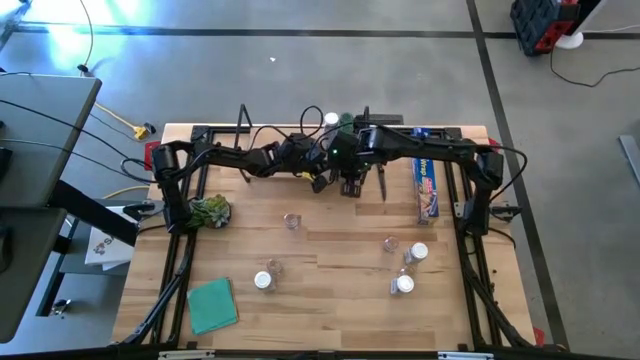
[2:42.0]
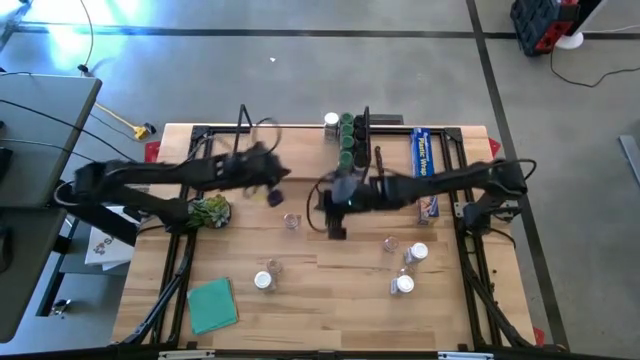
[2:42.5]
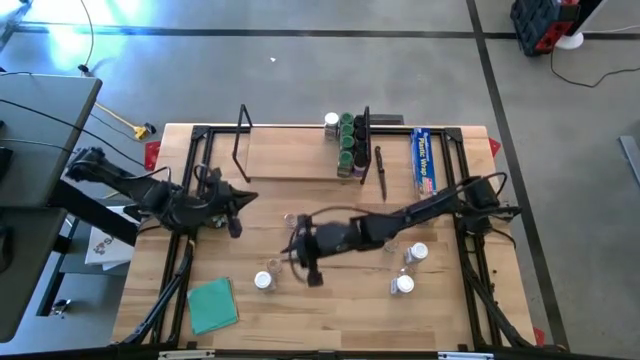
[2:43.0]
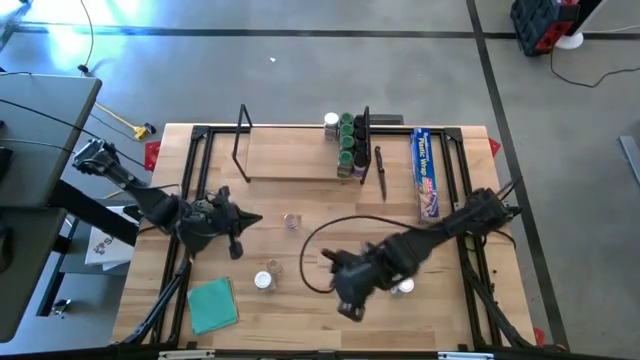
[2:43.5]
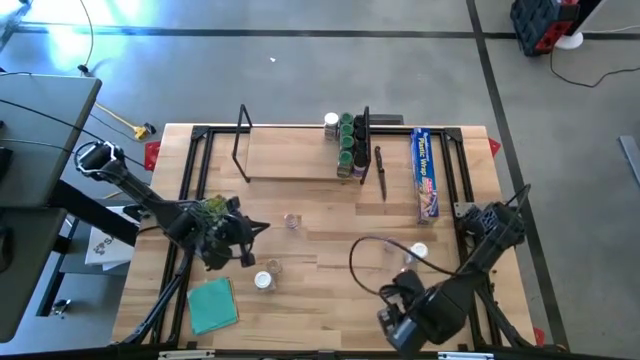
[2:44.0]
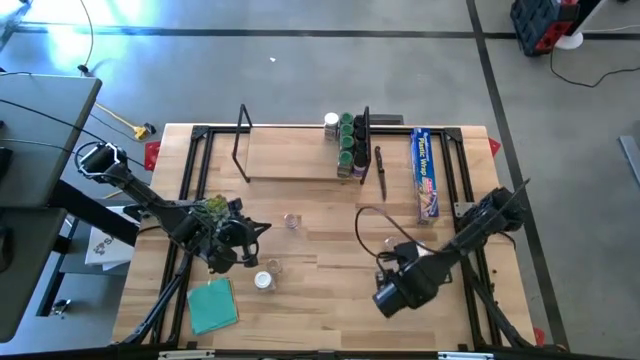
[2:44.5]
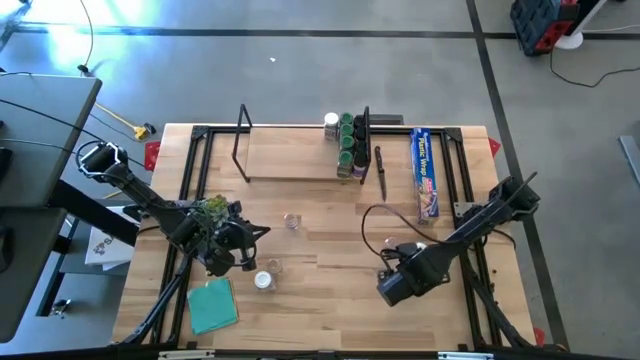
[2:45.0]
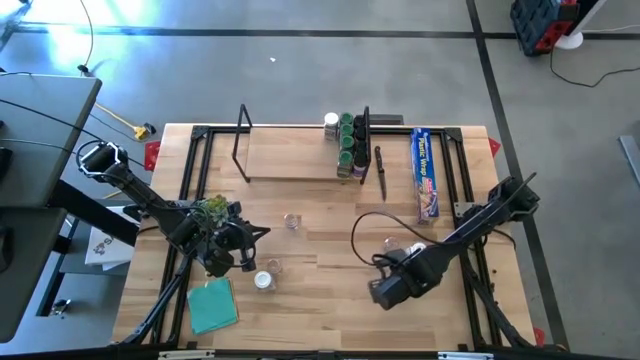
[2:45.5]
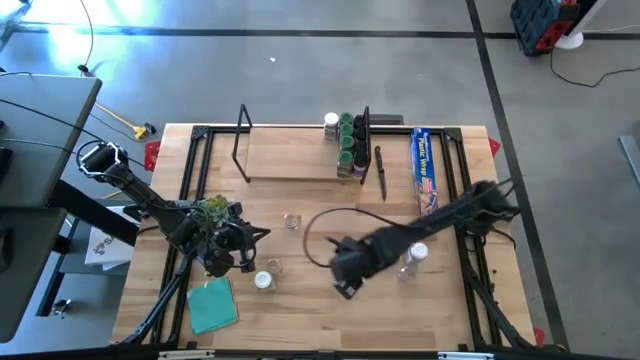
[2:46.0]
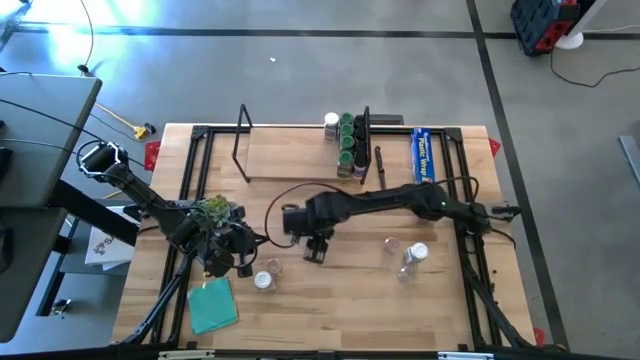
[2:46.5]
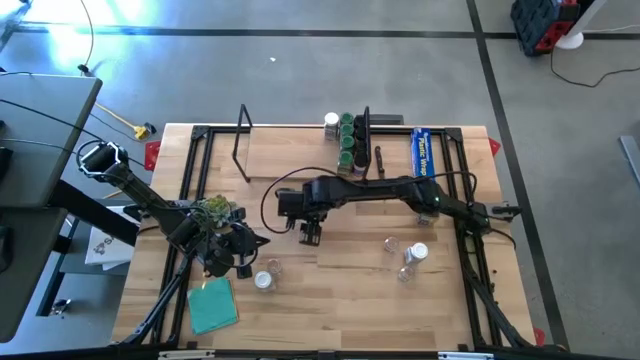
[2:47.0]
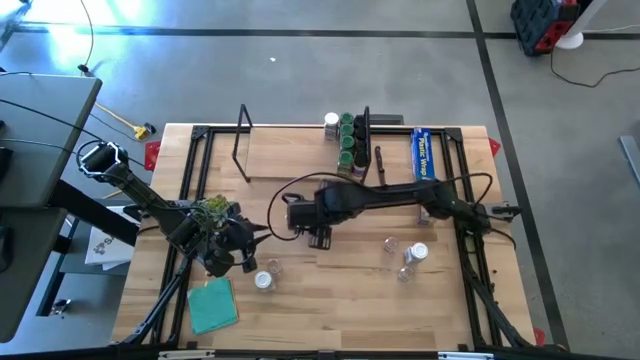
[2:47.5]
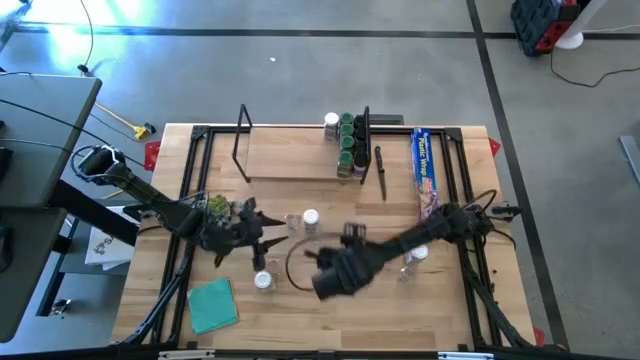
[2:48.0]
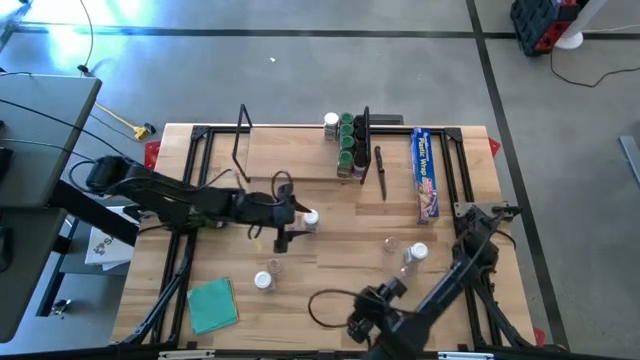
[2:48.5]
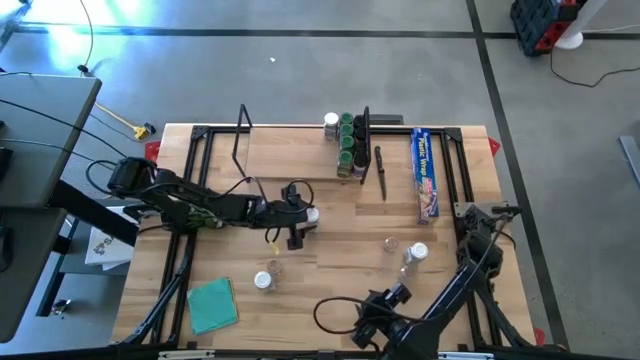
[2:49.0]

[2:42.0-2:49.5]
Task: Shelf spices
Put the white seasoning bottle on the shelf aligned with the other white seasoning bottle

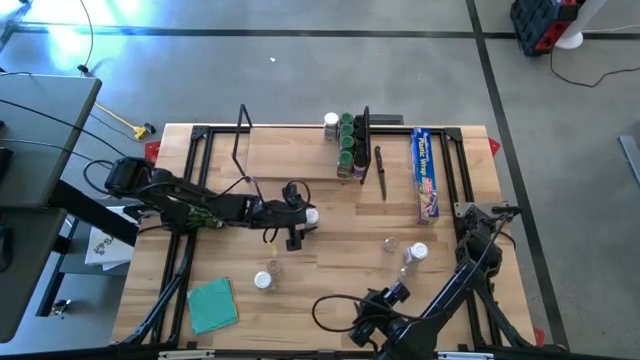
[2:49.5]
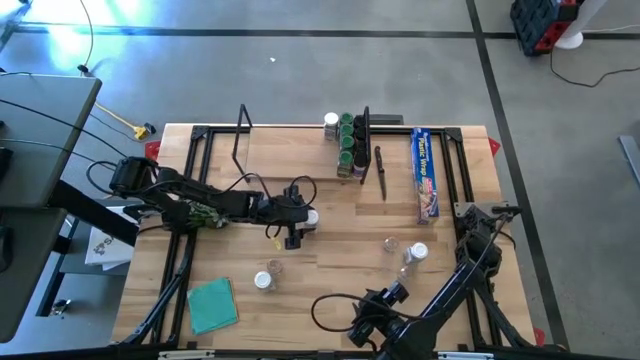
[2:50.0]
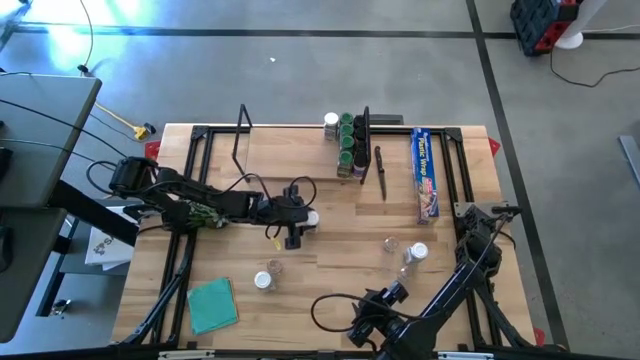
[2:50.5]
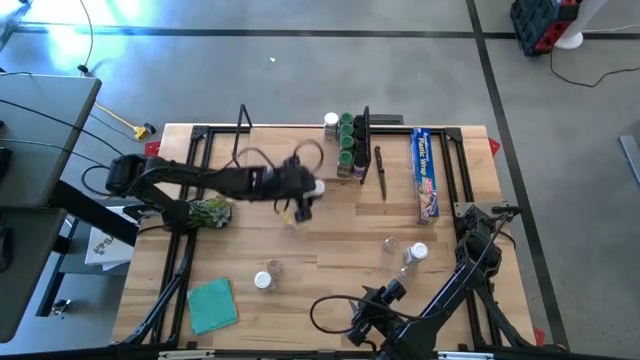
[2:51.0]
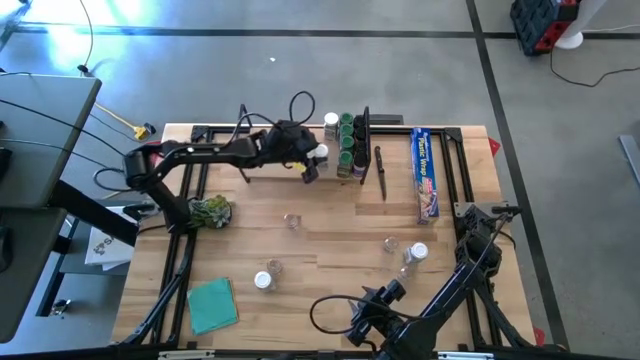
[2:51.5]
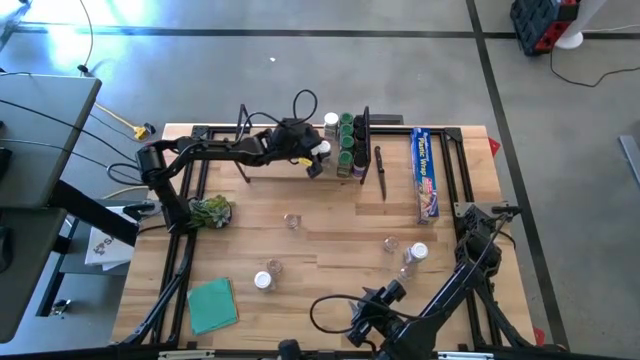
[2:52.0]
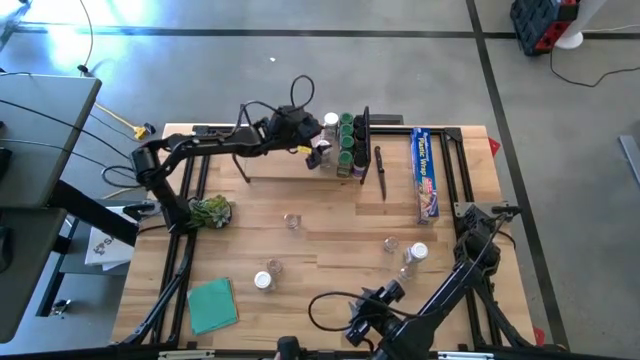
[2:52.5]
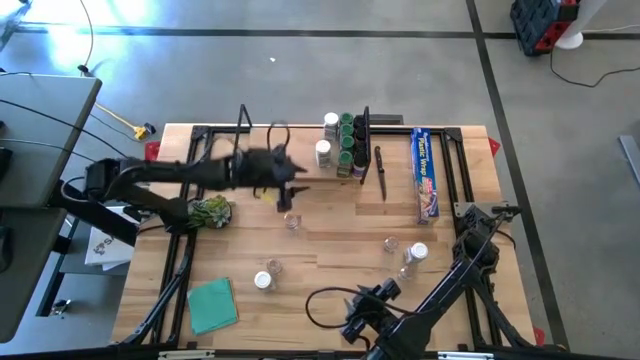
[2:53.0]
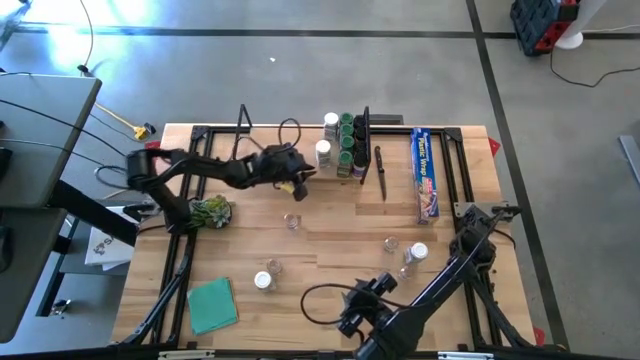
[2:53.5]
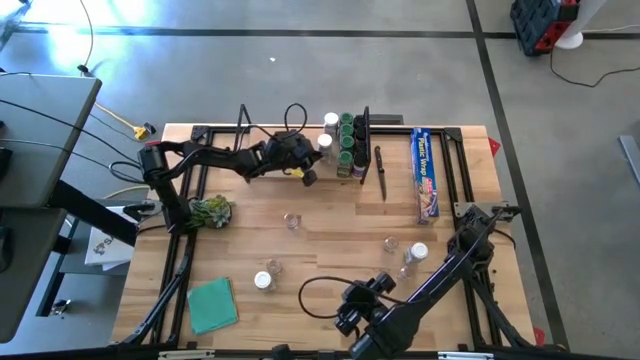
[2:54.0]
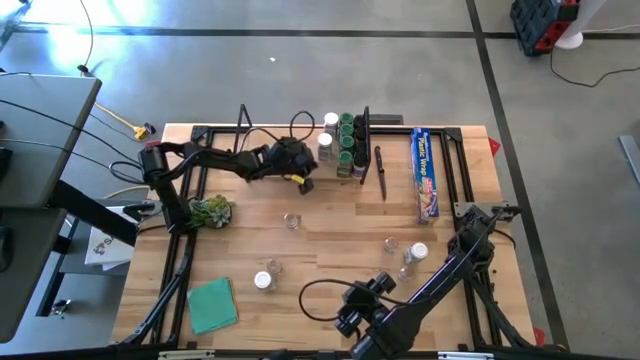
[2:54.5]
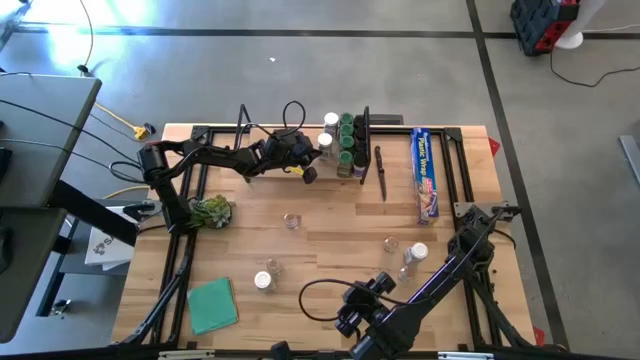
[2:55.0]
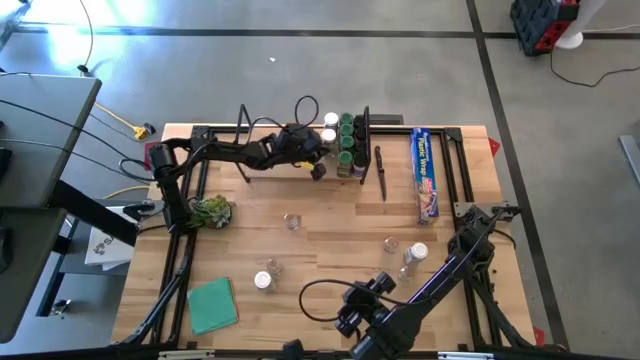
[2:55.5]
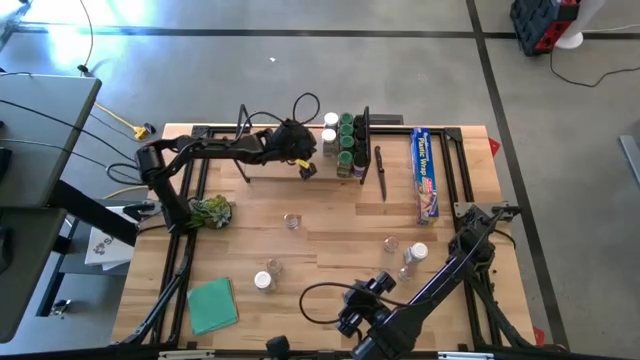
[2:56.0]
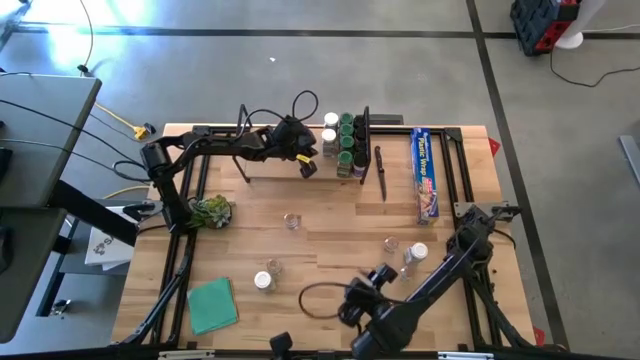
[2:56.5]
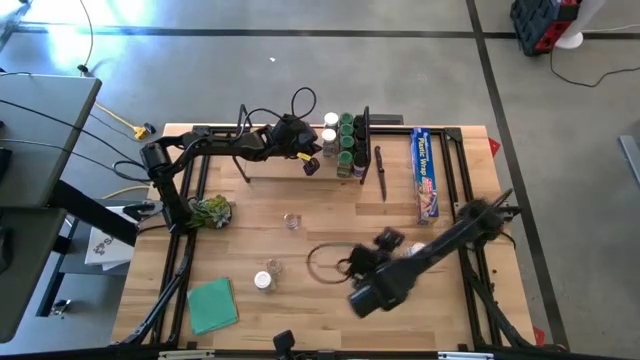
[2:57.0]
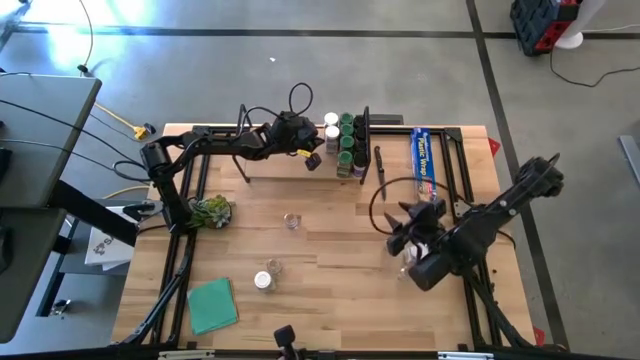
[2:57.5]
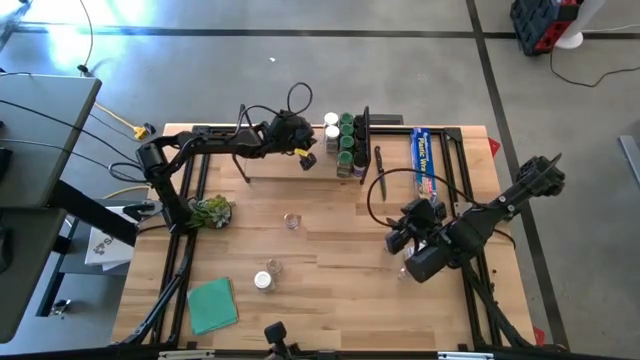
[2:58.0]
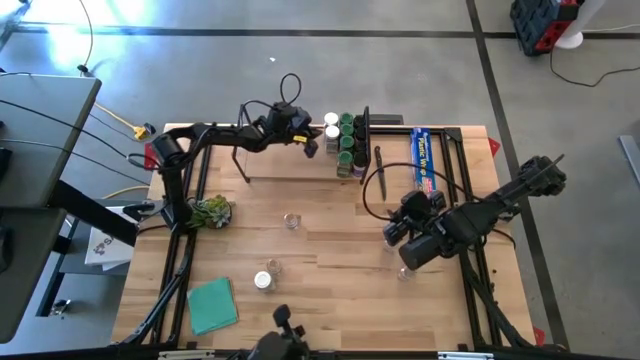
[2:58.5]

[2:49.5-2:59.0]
Put the white seasoning bottle on the shelf aligned with the other white seasoning bottle

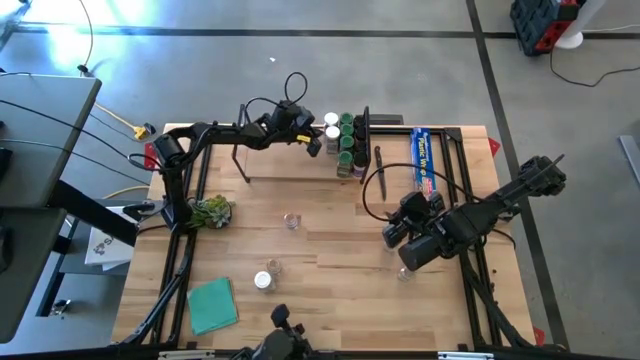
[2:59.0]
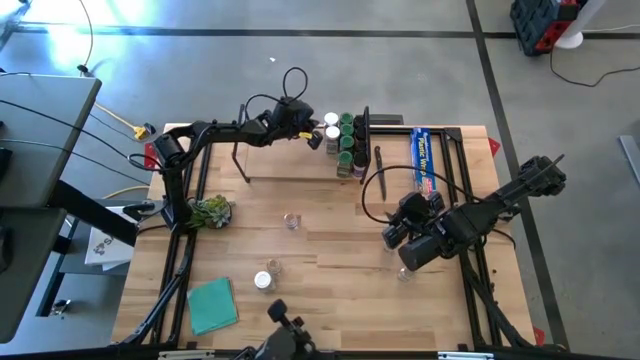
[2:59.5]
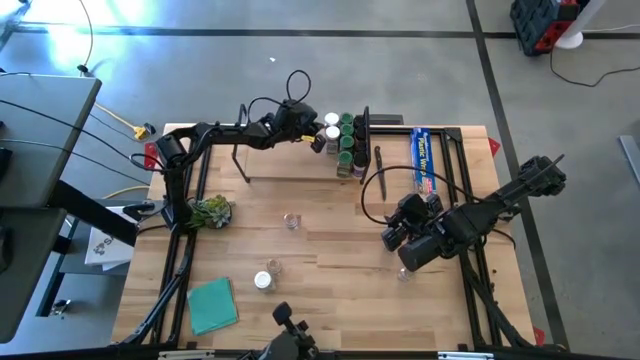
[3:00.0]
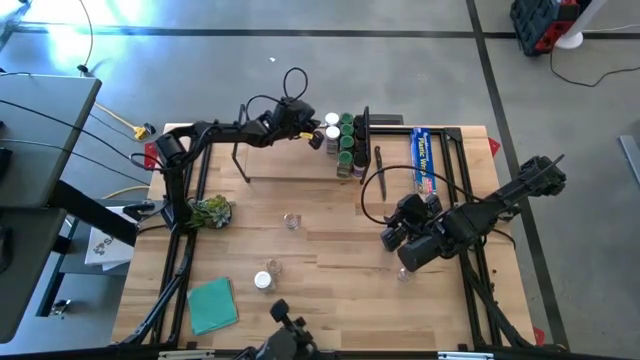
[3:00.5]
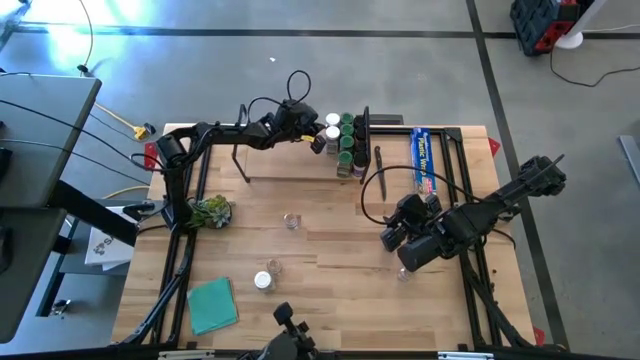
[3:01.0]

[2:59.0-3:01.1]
Adjust the white seasoning bottle on the shelf
